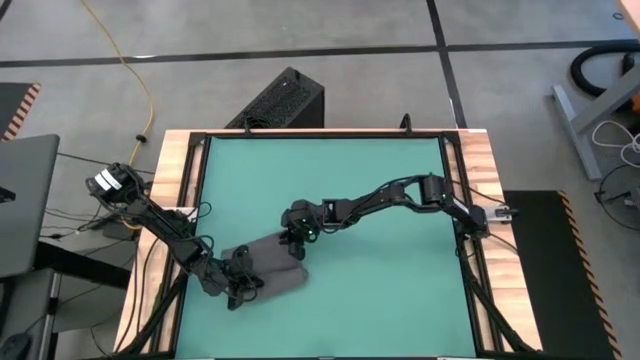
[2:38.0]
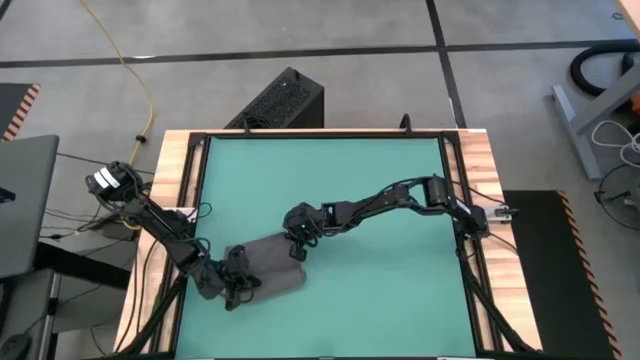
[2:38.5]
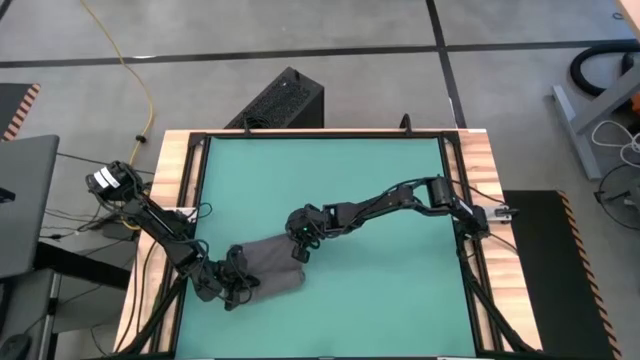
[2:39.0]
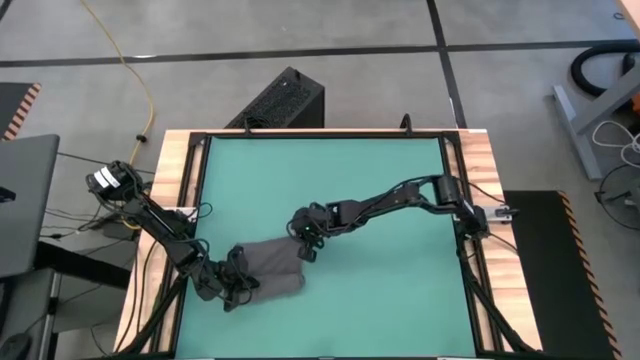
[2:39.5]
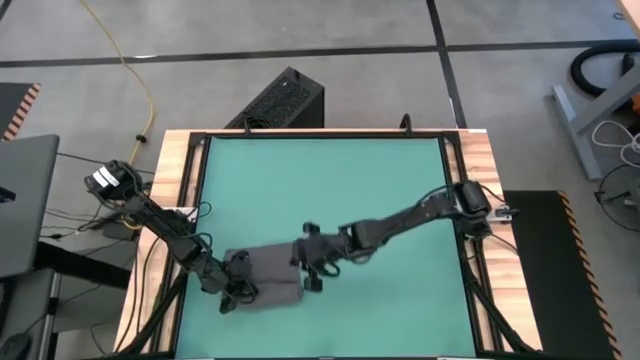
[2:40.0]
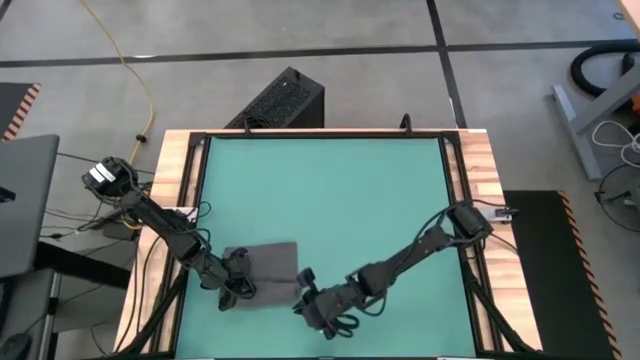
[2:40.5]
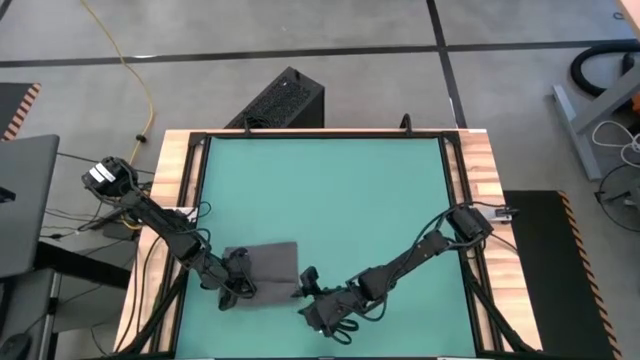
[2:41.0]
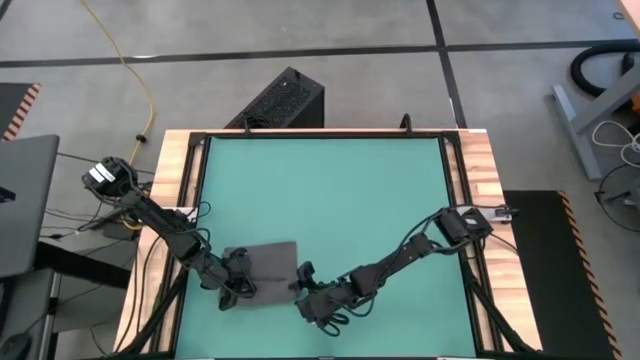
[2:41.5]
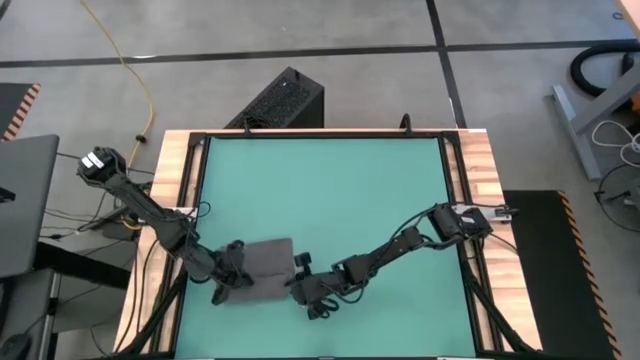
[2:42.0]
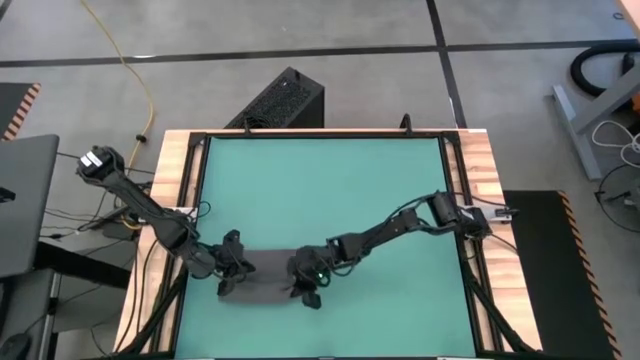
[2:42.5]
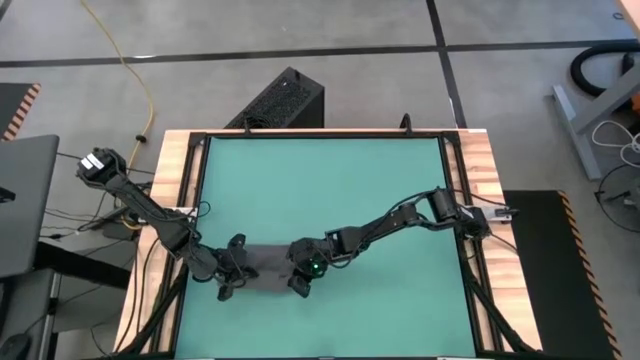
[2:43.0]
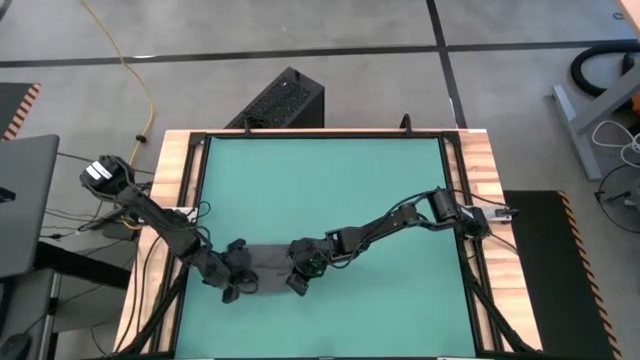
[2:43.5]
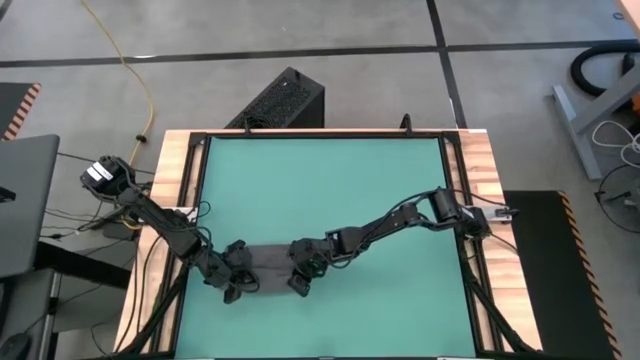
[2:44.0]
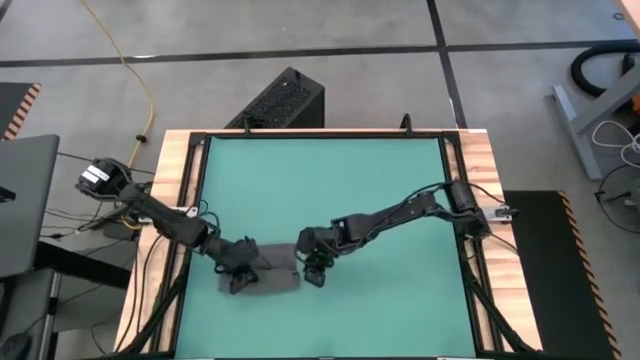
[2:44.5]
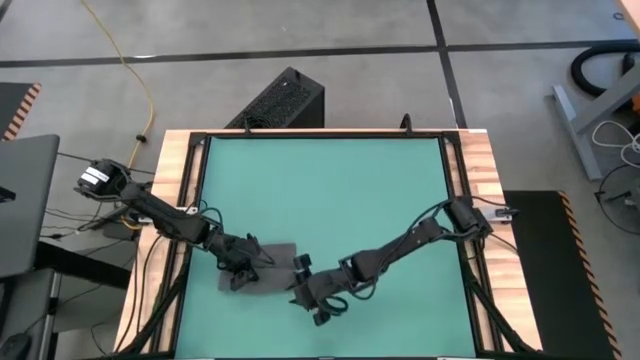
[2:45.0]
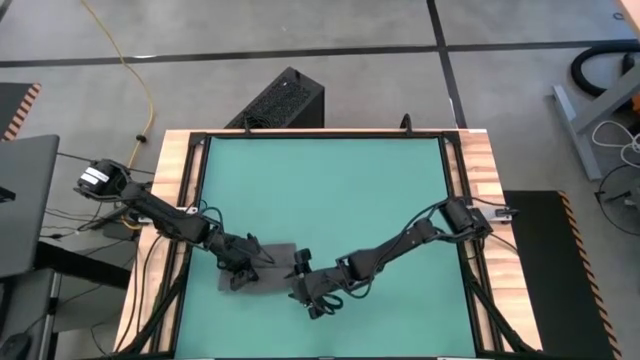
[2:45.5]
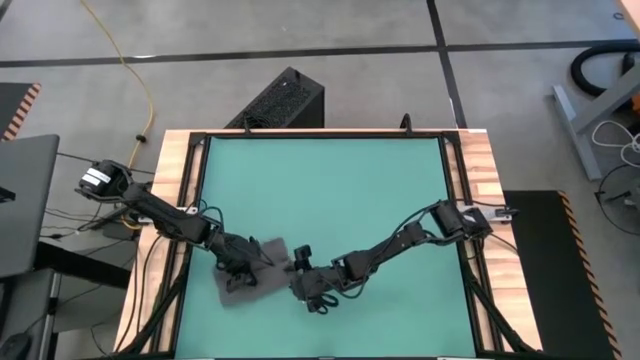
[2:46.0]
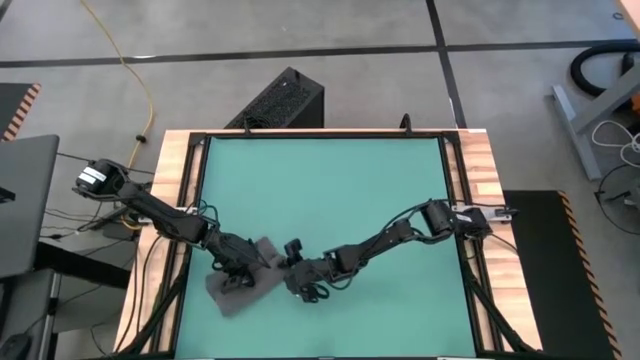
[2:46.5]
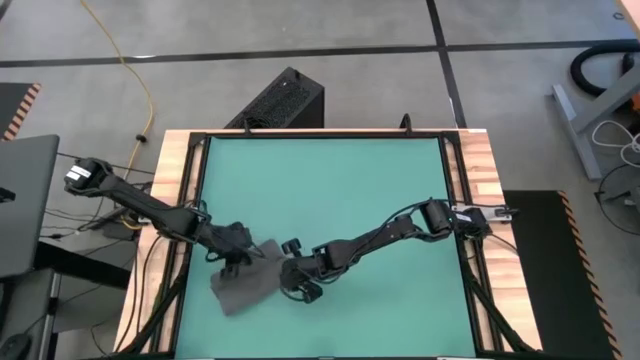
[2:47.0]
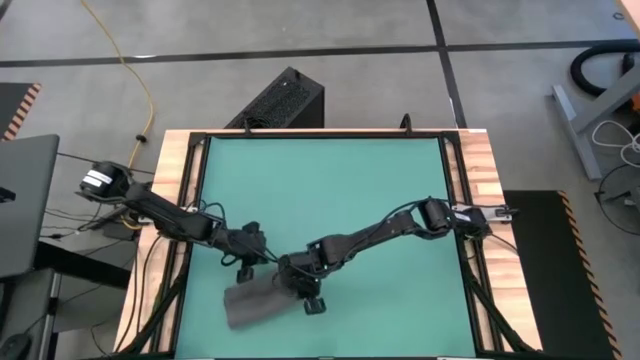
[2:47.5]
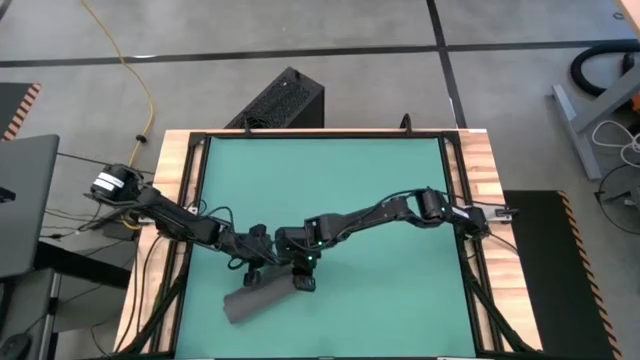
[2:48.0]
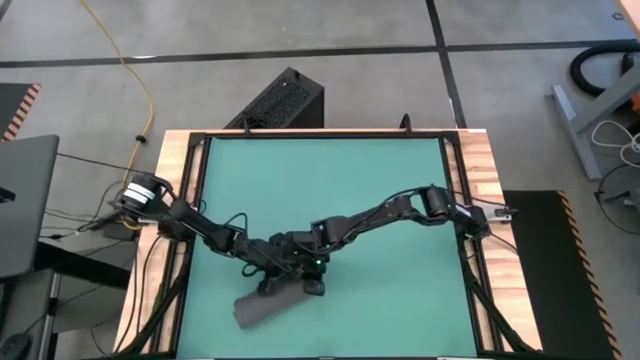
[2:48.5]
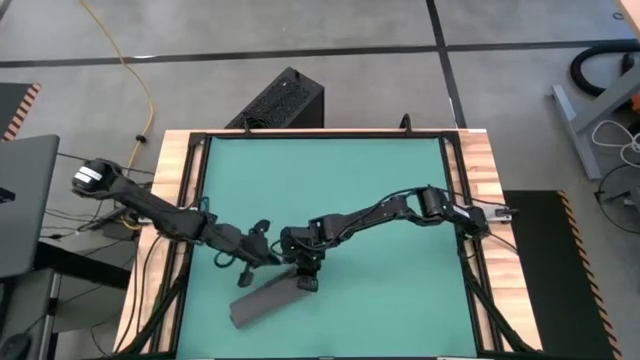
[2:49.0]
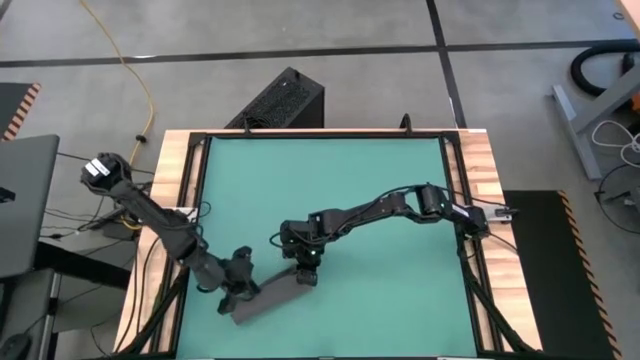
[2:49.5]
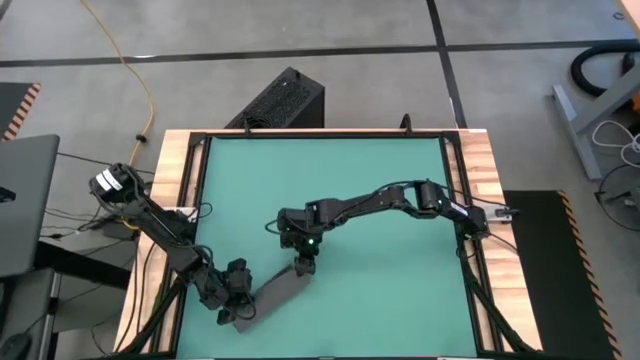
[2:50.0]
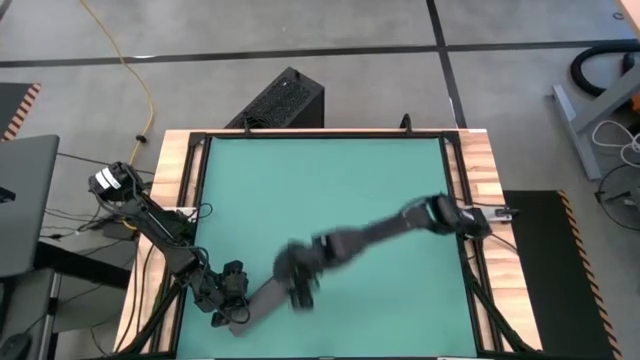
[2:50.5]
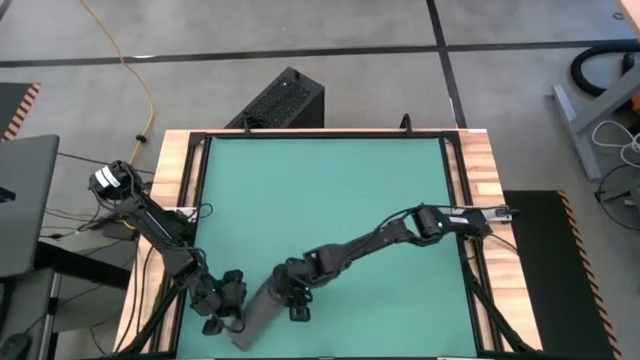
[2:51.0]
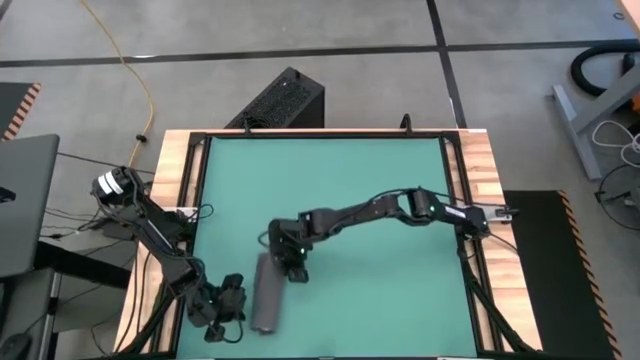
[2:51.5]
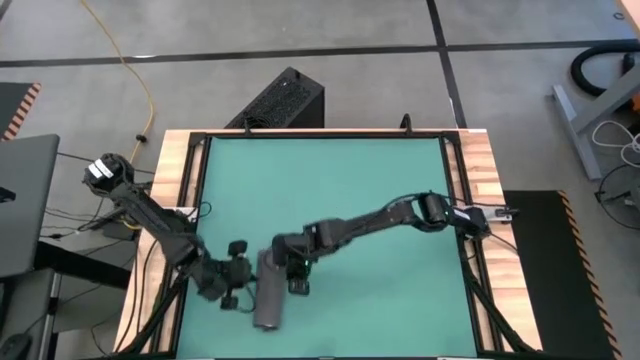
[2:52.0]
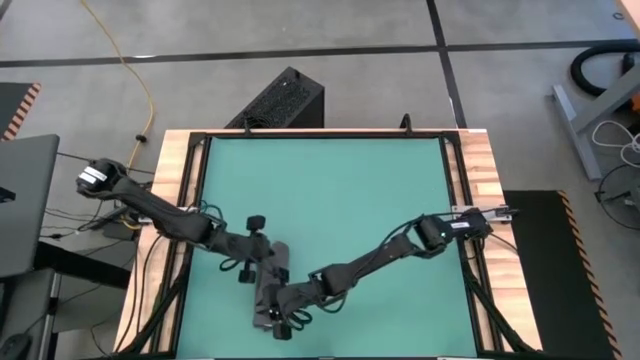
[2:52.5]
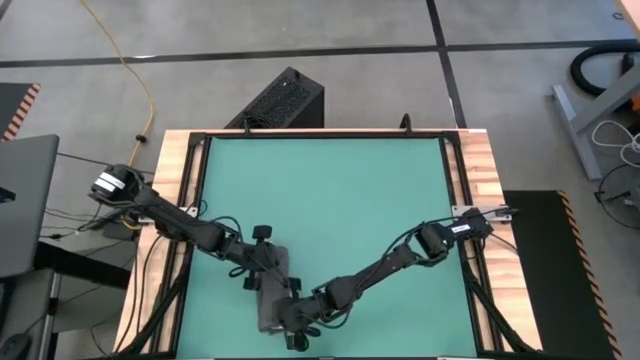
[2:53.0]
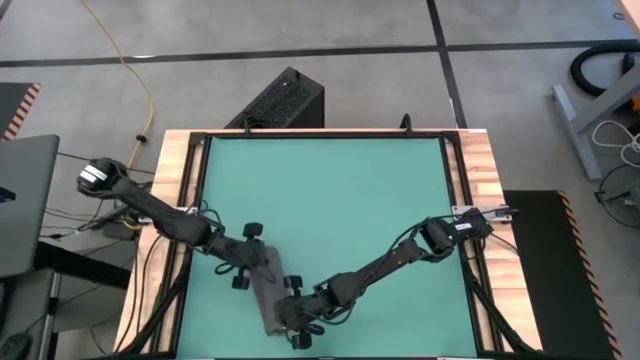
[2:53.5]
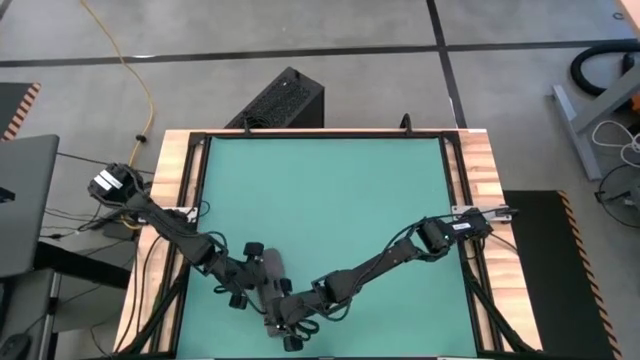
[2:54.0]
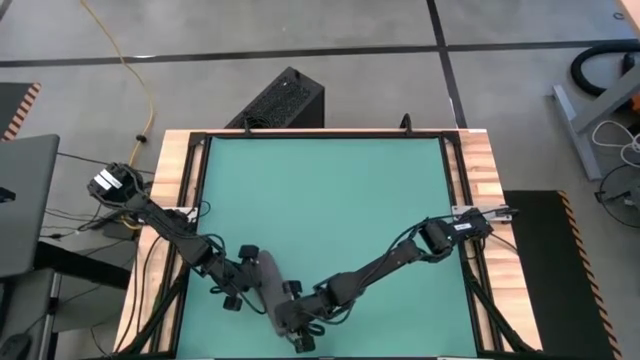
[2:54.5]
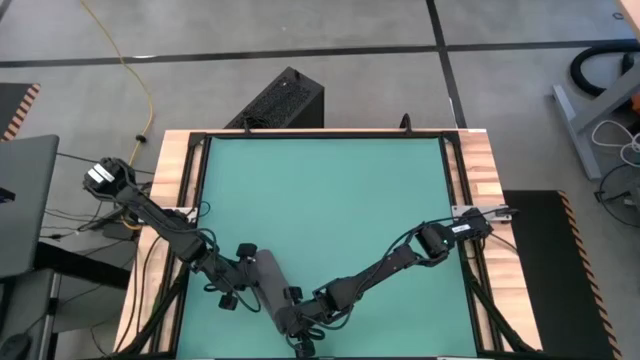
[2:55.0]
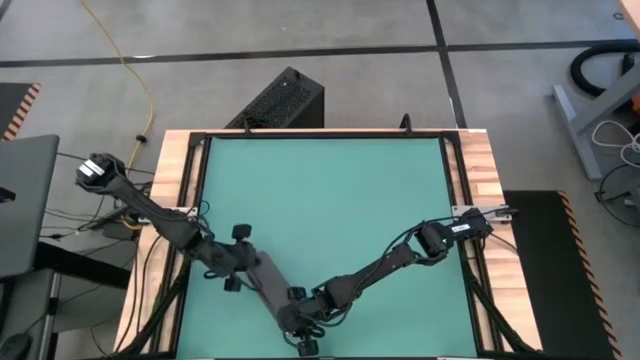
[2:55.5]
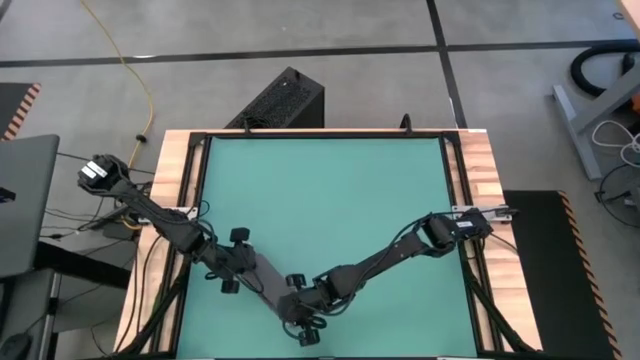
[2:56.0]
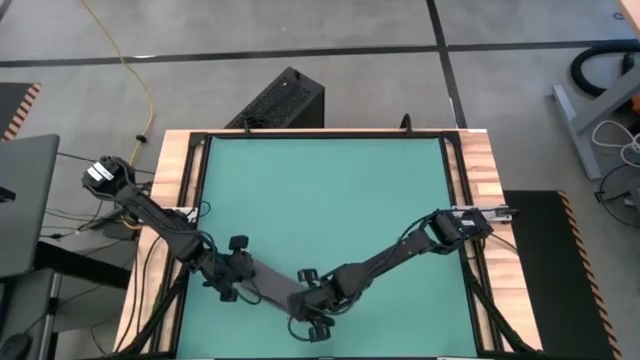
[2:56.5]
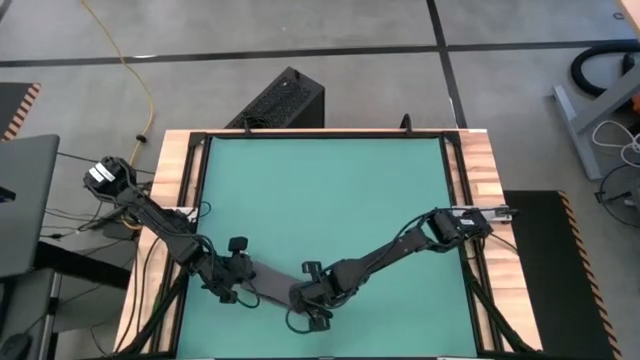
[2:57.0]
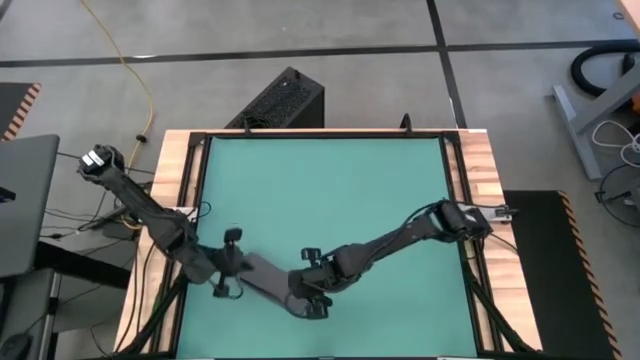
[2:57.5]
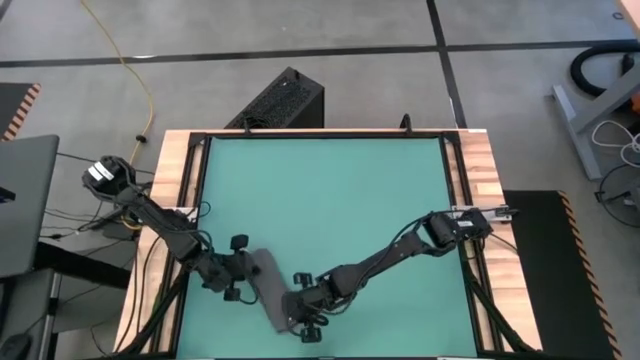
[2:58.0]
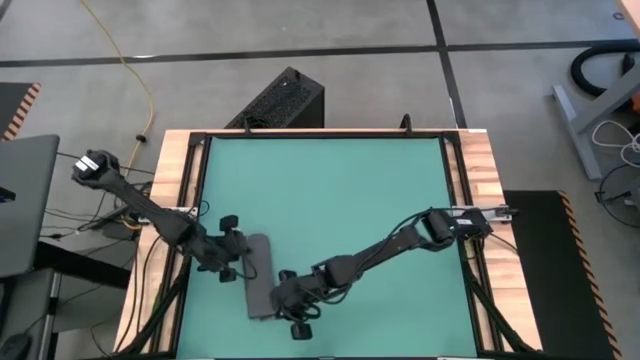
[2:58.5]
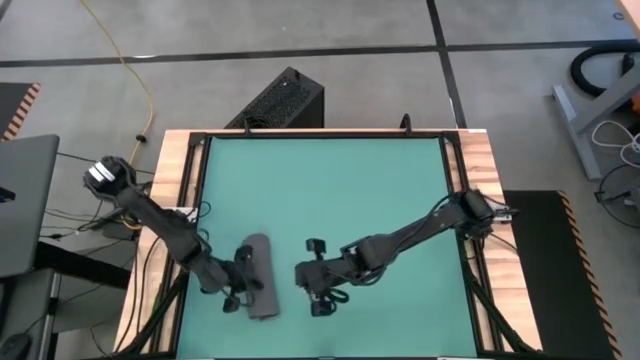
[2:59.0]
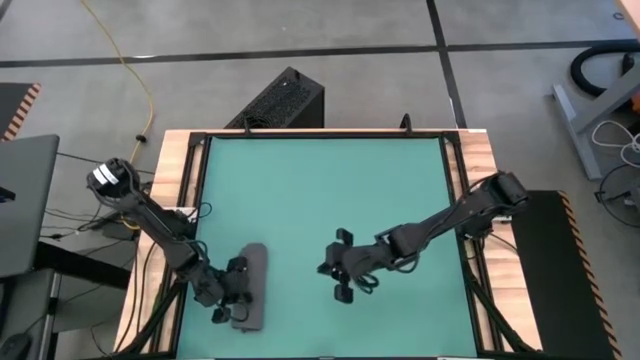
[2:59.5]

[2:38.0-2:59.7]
Task: Roll towel
Roll the gray towel
